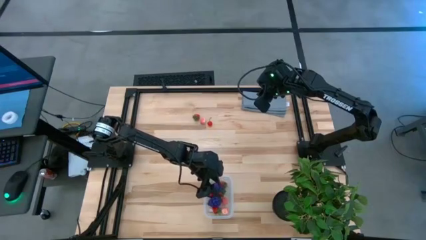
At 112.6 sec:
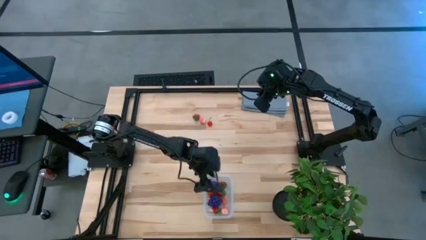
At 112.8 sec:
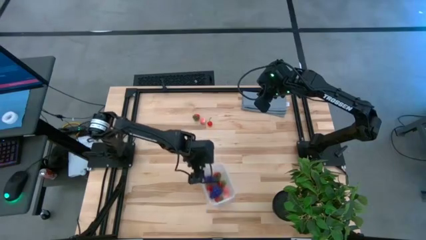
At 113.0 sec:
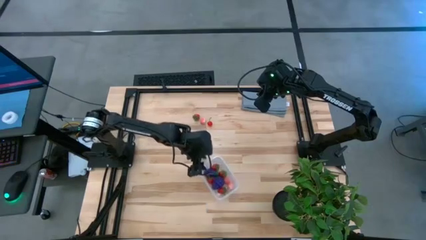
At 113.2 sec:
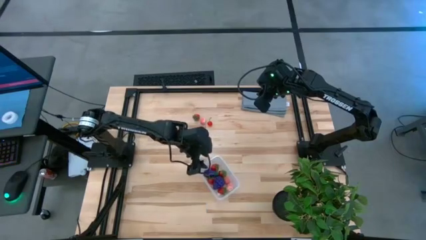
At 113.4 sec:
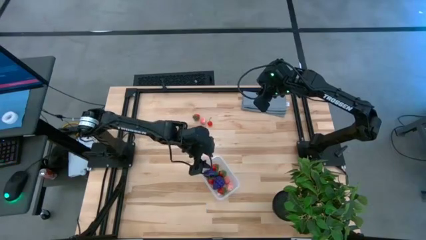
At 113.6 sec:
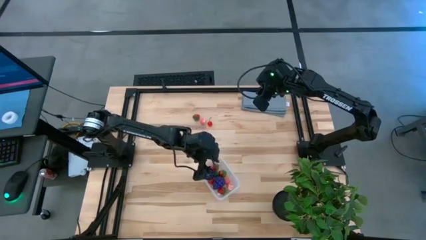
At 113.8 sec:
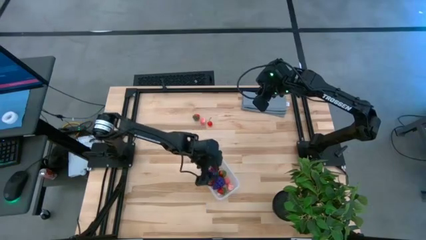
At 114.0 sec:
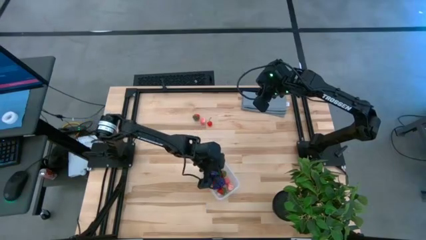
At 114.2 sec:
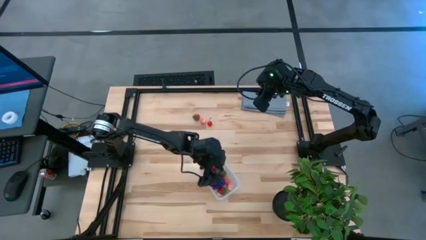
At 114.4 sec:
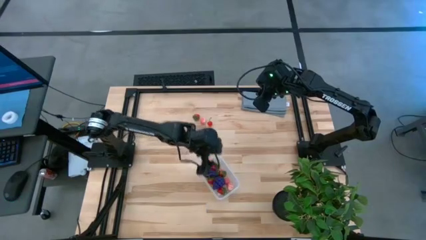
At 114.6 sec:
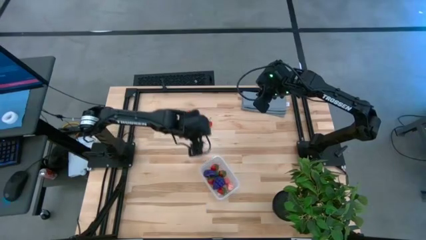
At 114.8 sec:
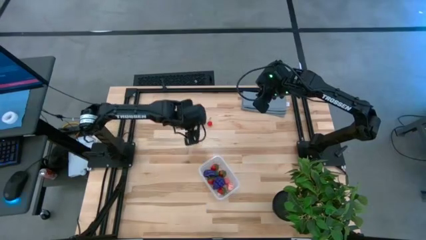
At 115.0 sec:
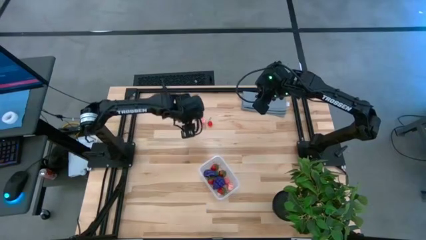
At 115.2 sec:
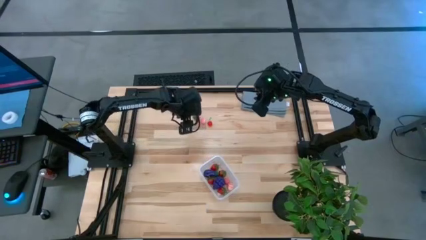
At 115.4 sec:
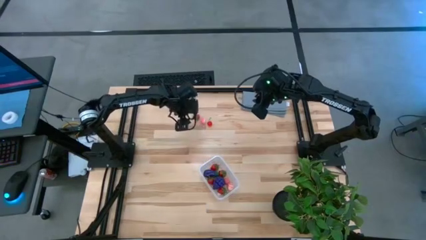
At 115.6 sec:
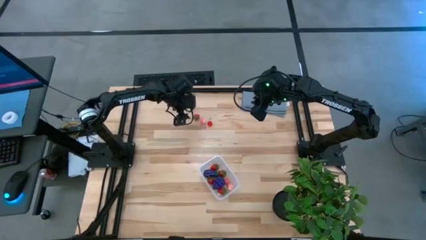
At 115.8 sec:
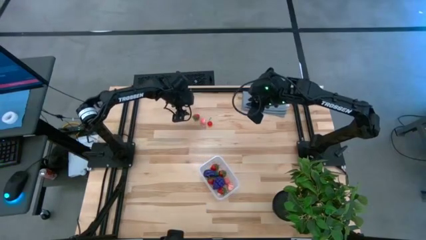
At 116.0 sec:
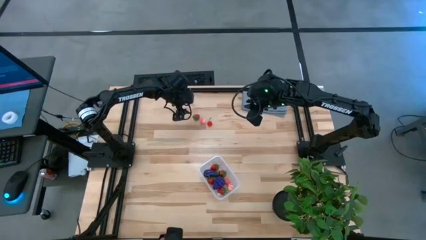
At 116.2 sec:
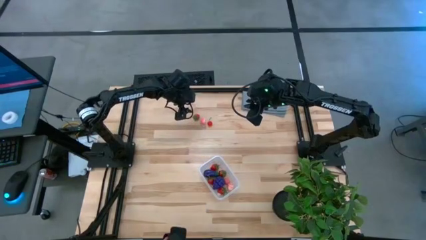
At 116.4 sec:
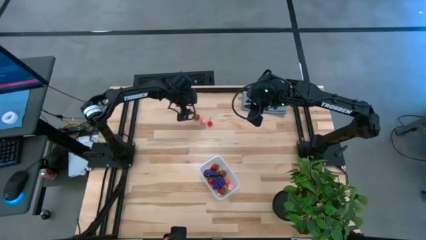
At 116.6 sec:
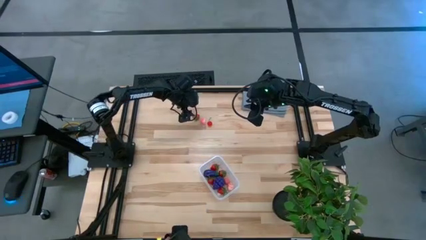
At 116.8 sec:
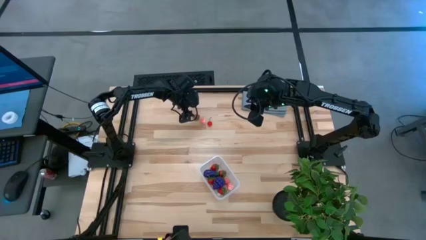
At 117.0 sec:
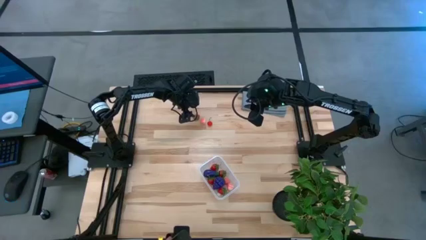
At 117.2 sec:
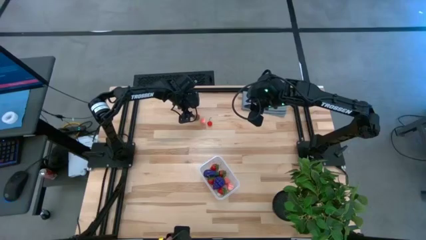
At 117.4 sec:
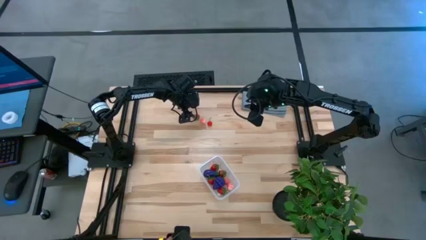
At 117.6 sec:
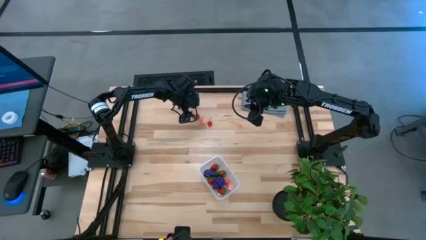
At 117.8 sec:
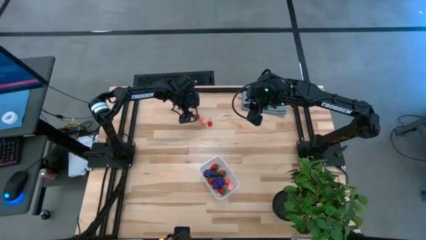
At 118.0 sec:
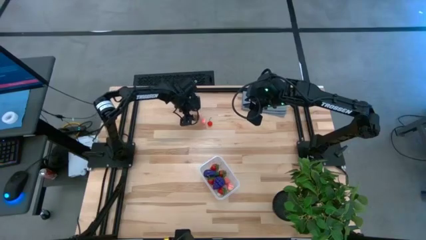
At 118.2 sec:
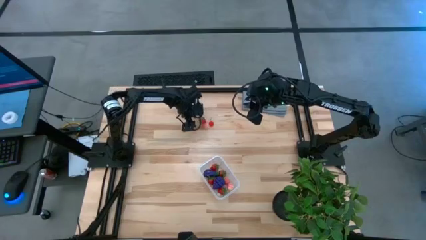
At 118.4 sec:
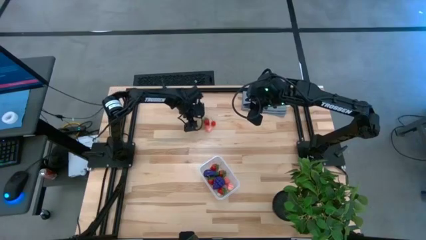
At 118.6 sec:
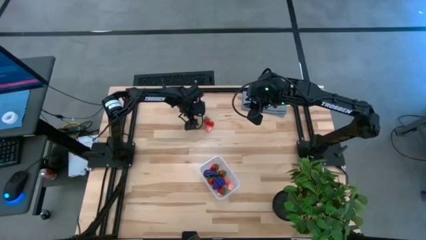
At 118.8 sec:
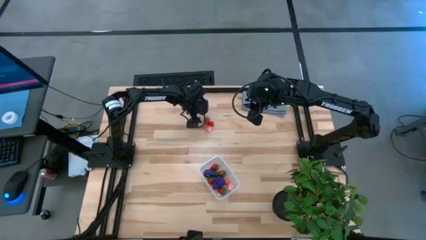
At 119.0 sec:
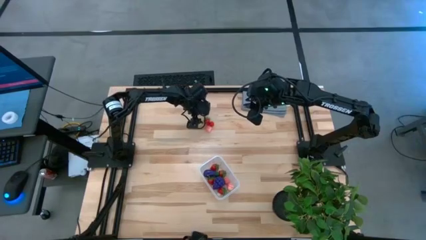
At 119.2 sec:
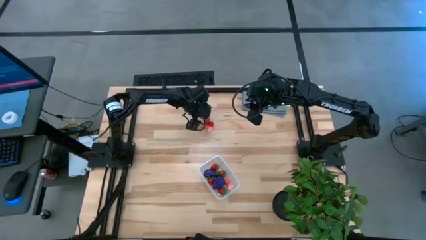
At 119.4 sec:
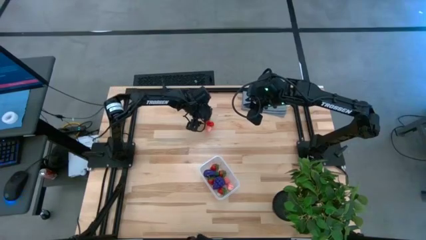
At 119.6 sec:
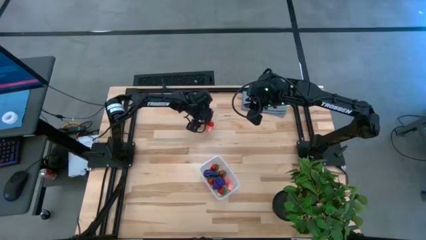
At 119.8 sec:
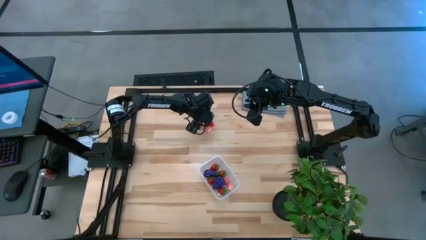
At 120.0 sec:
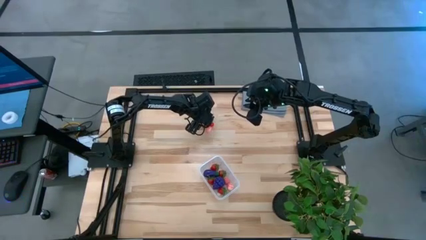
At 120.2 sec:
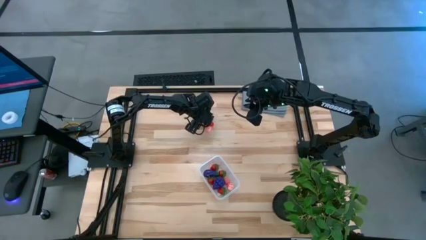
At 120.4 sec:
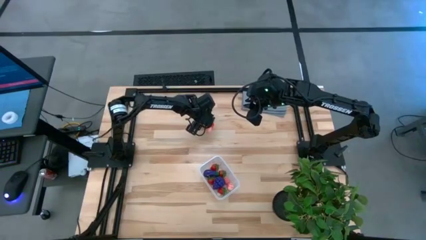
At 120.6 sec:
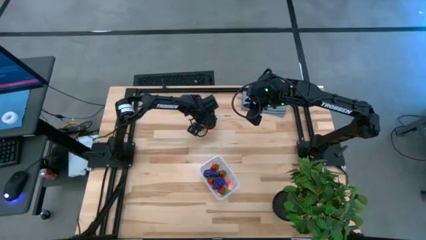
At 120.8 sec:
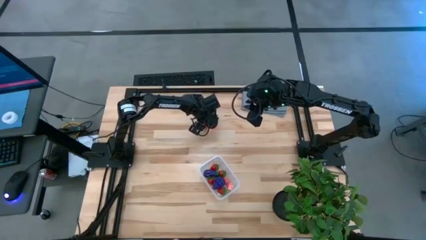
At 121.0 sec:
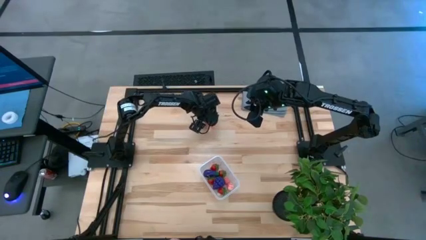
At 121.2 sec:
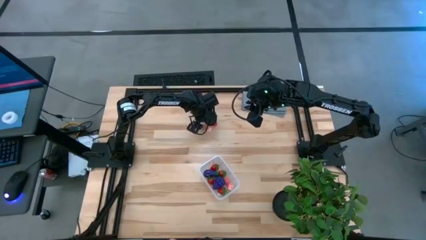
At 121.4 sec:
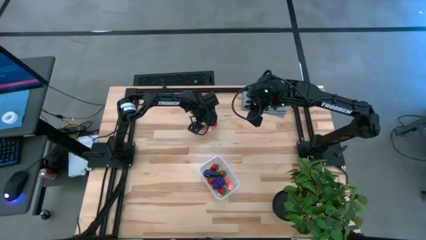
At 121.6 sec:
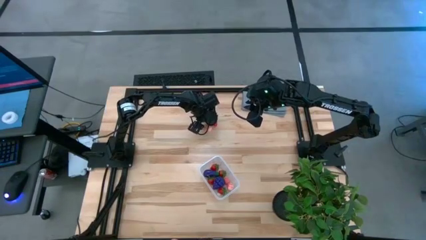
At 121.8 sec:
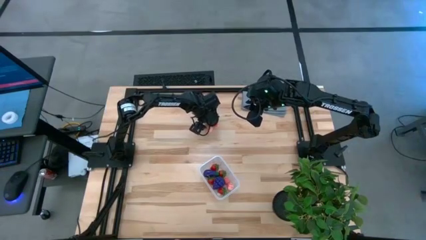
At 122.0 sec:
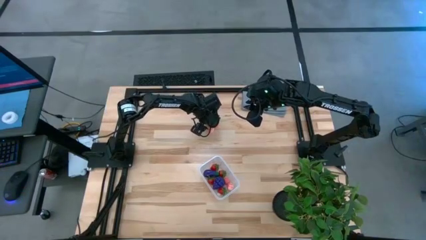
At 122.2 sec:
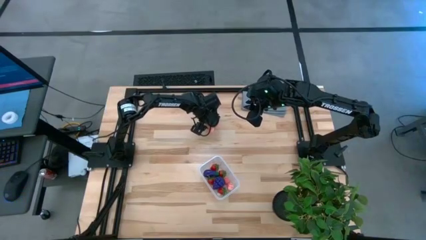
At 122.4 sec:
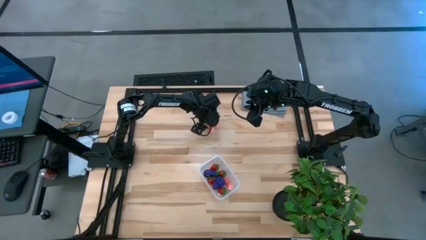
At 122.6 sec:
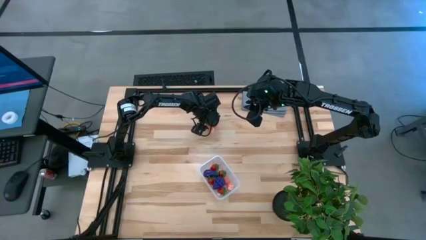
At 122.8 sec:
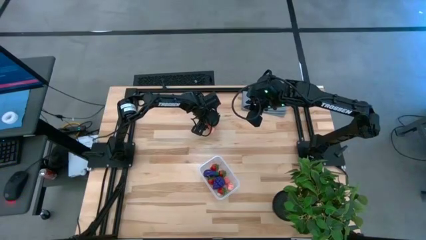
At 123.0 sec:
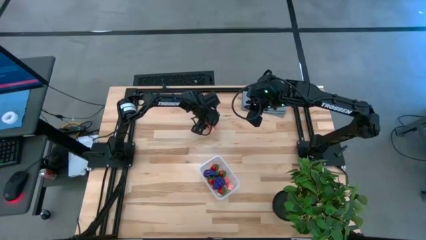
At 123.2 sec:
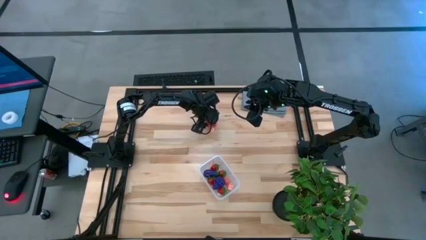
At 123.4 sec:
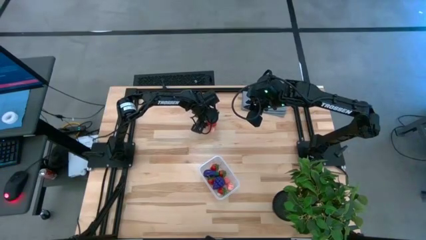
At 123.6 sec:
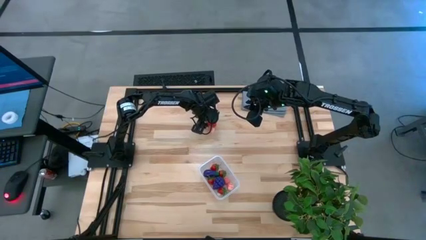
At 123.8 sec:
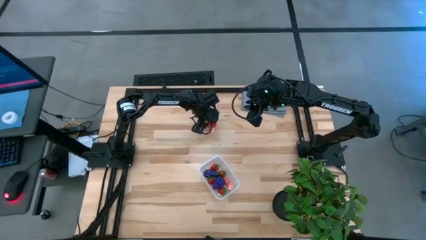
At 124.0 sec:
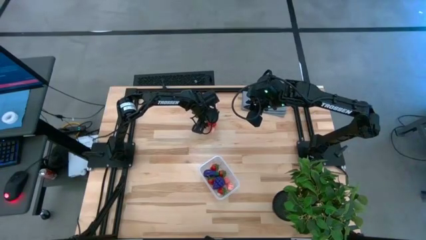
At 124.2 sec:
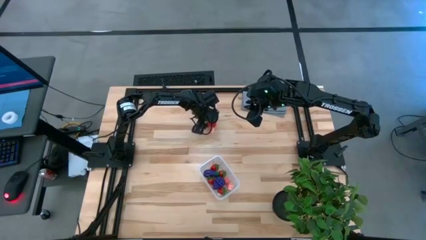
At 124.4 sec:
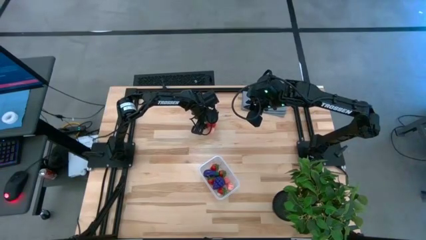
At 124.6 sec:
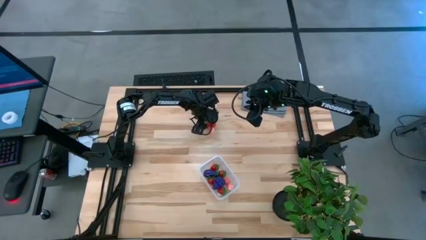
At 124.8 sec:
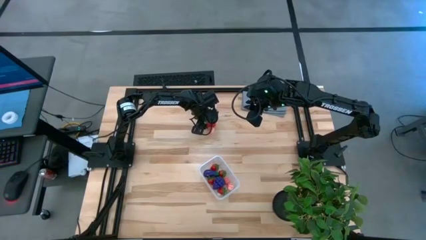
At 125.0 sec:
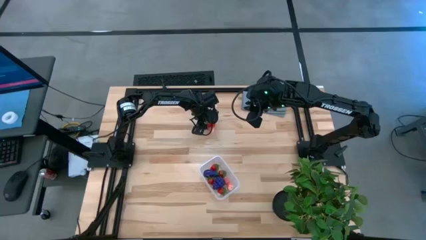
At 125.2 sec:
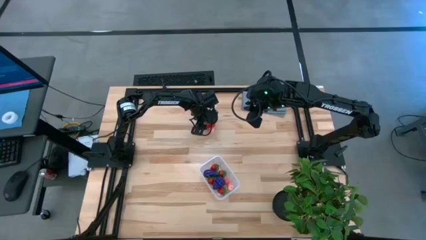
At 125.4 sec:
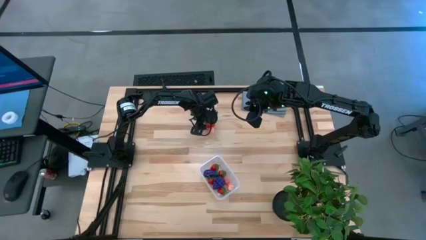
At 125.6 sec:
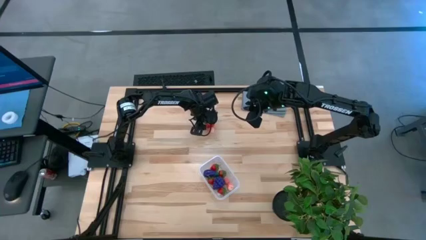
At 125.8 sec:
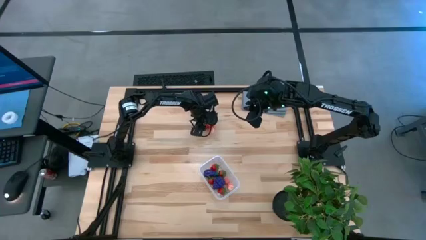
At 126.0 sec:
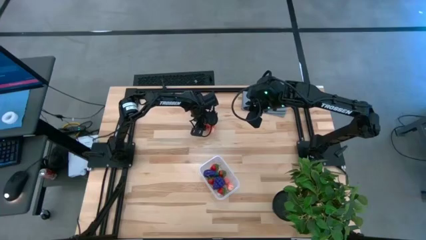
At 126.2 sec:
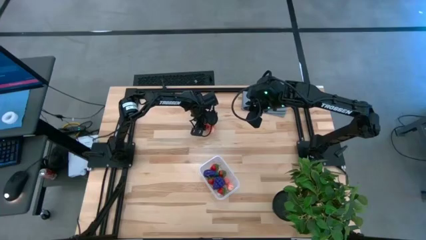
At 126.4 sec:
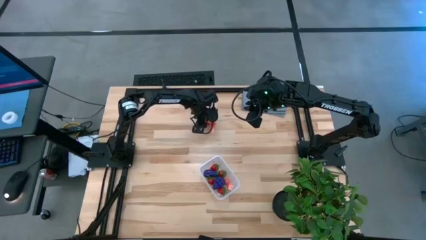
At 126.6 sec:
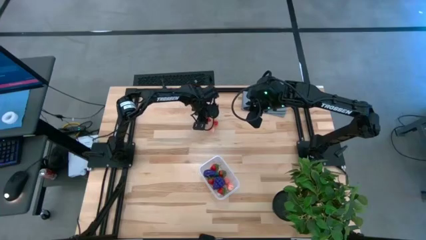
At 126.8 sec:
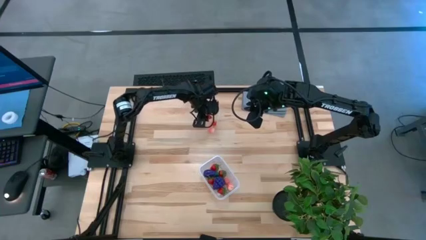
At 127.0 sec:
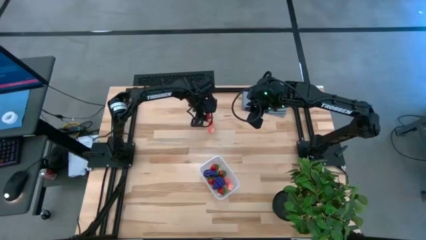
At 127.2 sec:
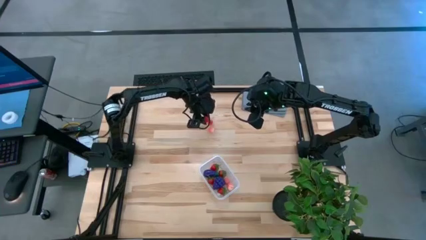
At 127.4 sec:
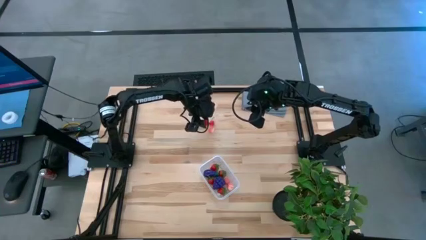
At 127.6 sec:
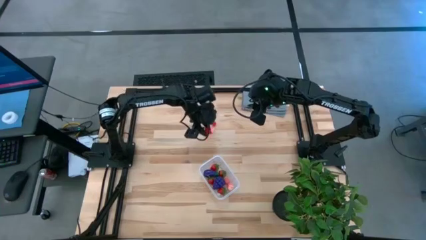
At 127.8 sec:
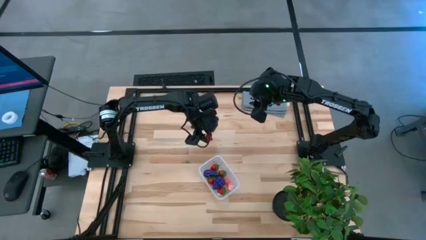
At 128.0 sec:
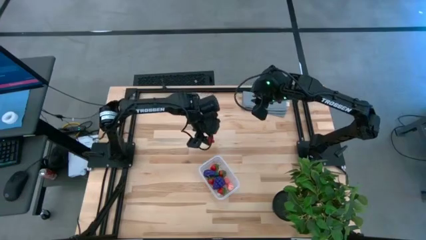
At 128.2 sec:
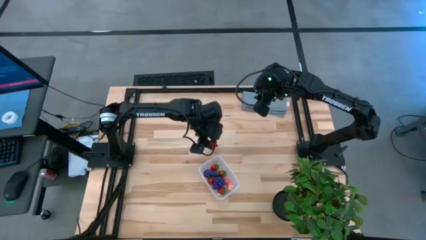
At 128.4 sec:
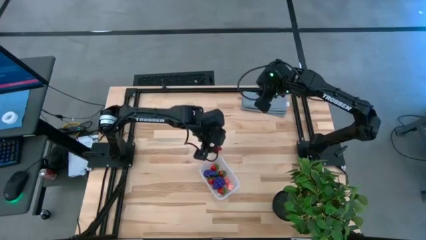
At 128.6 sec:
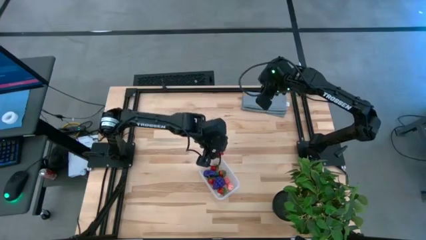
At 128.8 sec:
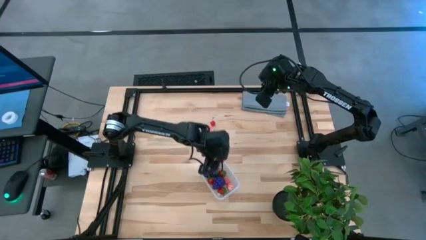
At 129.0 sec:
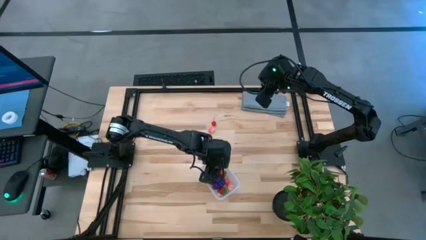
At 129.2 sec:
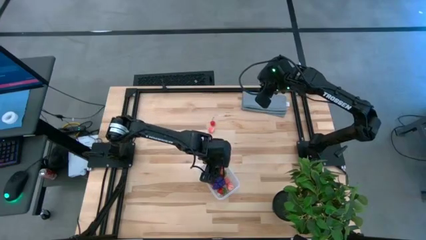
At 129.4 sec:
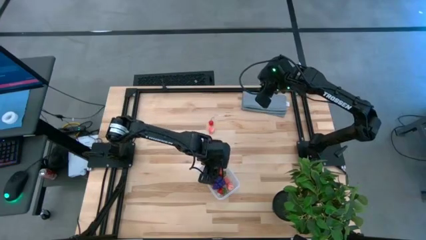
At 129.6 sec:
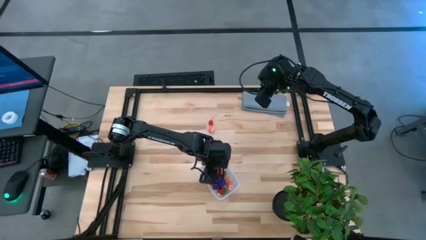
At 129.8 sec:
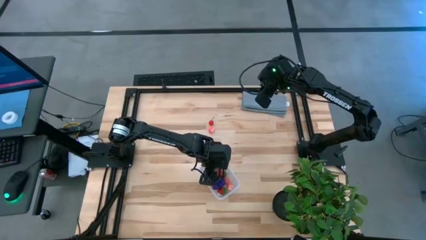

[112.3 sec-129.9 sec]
Task: Pick and placing Produce into tupperware
Put the red strawberry into the transparent bin
